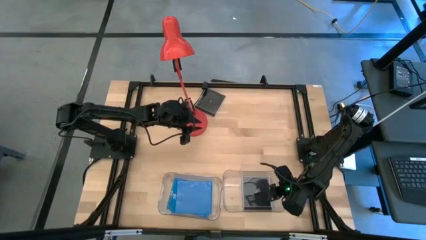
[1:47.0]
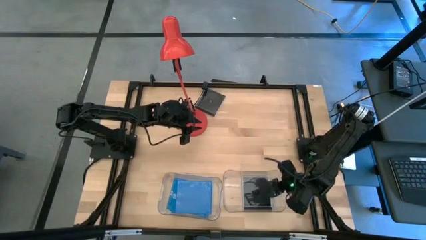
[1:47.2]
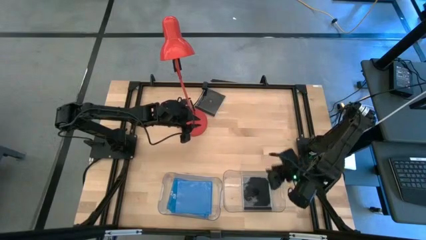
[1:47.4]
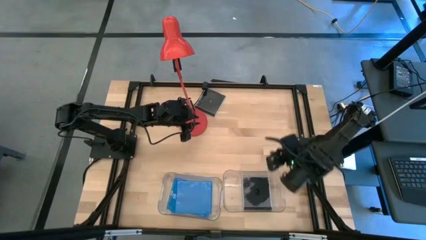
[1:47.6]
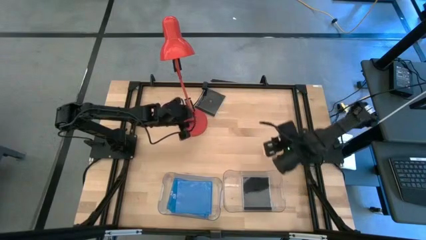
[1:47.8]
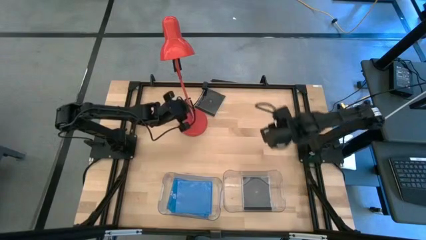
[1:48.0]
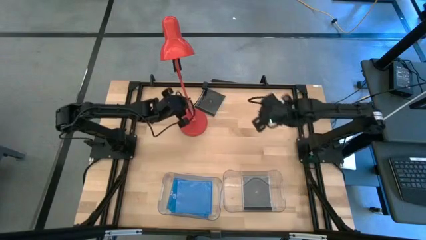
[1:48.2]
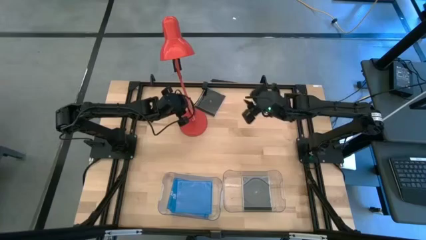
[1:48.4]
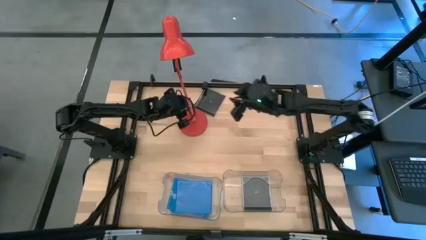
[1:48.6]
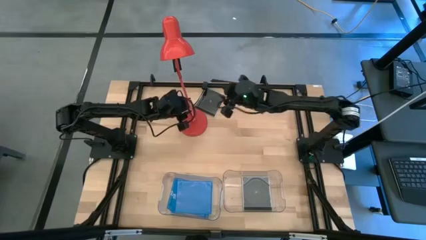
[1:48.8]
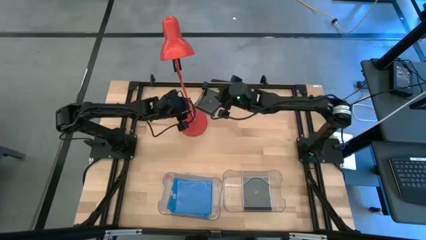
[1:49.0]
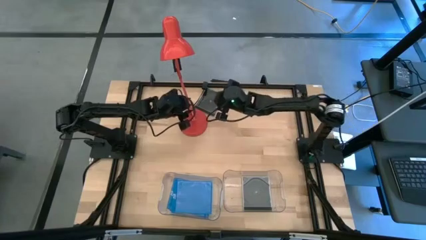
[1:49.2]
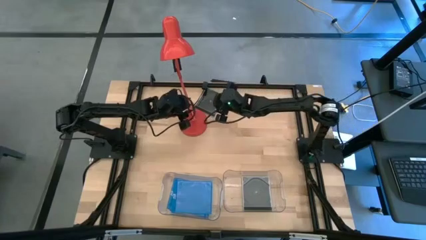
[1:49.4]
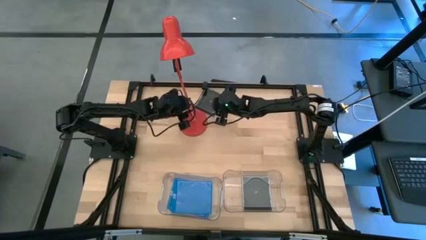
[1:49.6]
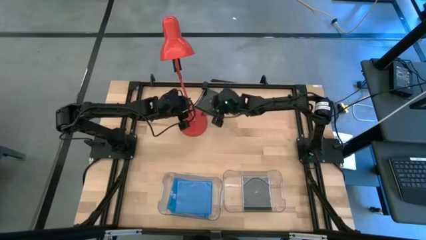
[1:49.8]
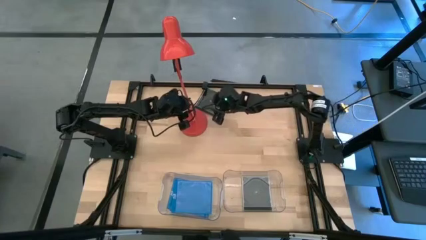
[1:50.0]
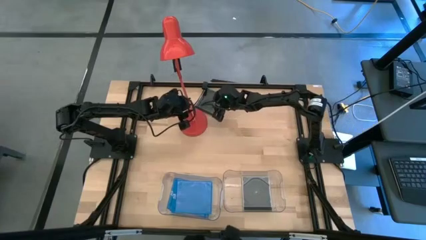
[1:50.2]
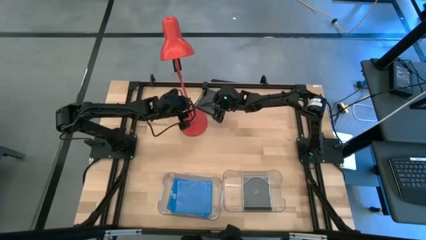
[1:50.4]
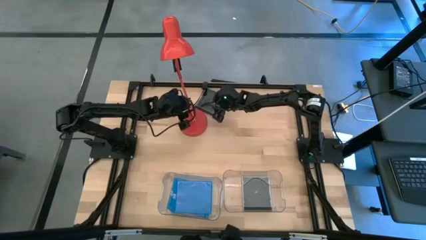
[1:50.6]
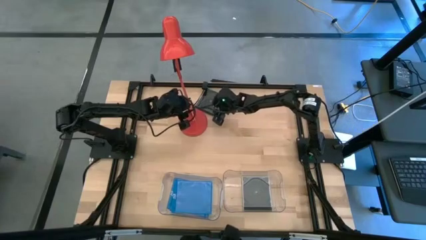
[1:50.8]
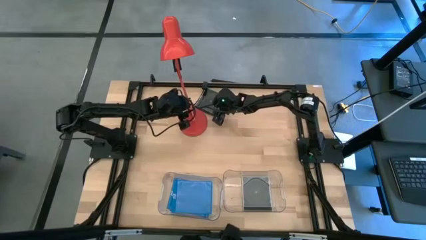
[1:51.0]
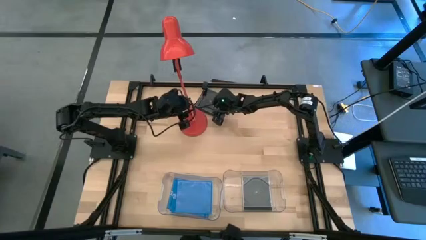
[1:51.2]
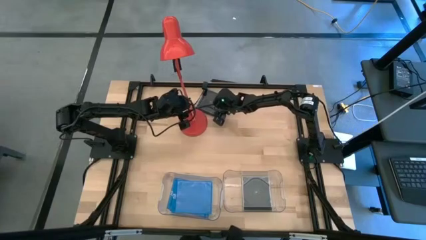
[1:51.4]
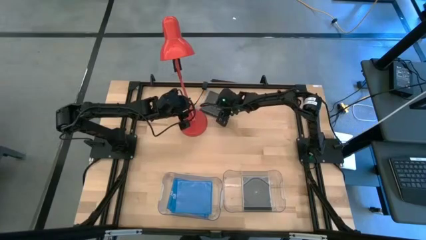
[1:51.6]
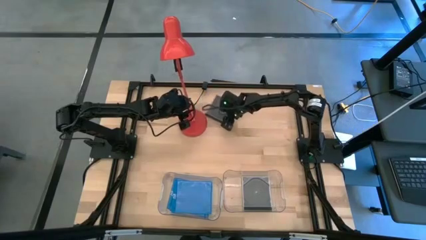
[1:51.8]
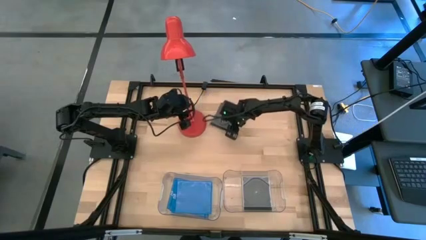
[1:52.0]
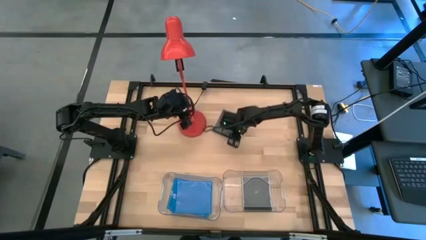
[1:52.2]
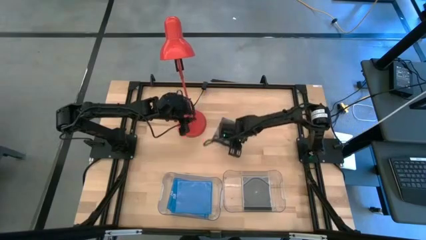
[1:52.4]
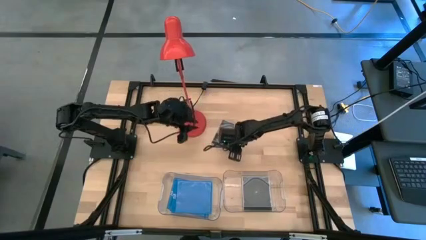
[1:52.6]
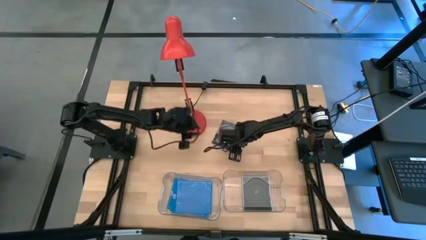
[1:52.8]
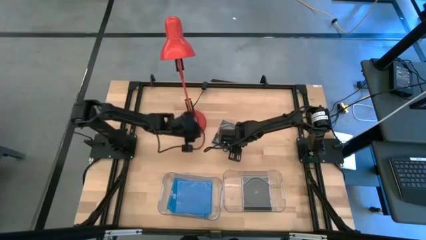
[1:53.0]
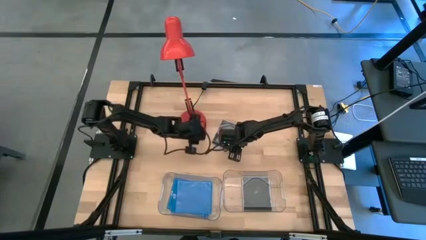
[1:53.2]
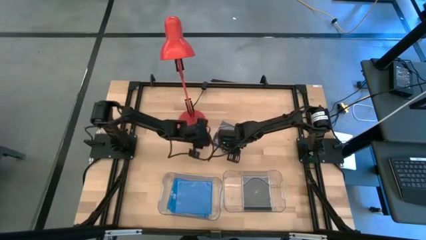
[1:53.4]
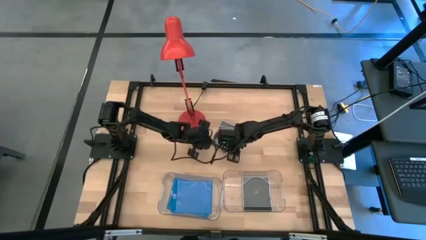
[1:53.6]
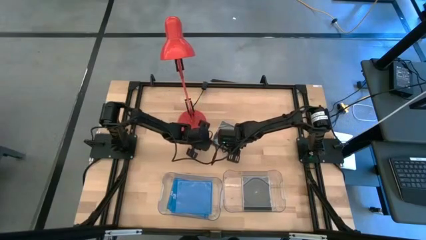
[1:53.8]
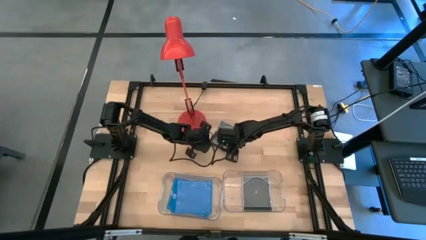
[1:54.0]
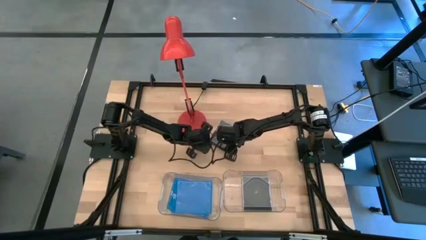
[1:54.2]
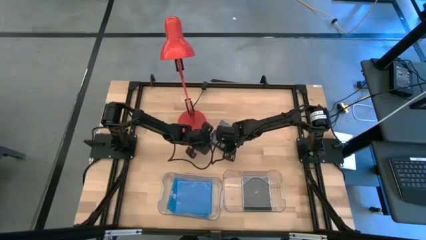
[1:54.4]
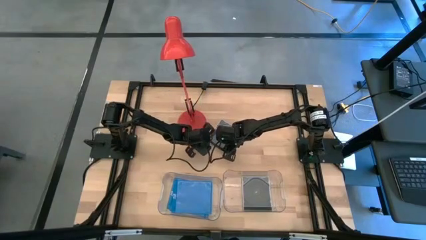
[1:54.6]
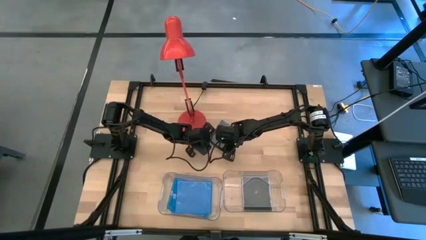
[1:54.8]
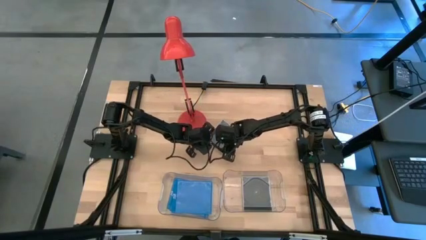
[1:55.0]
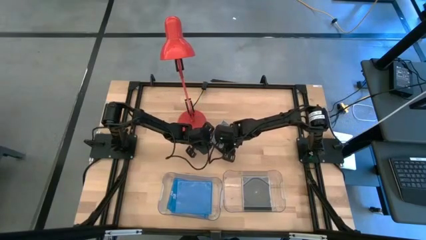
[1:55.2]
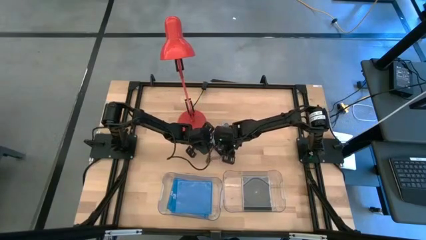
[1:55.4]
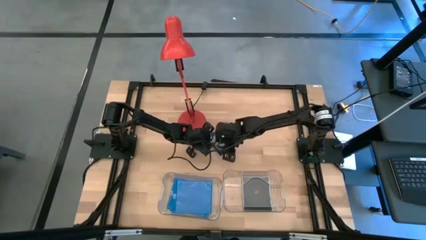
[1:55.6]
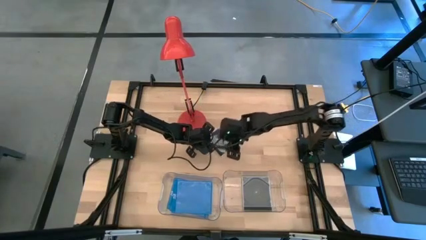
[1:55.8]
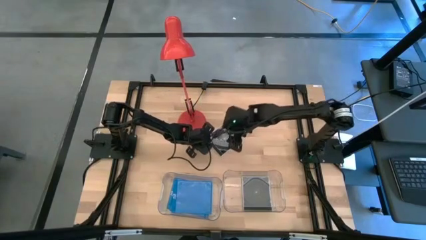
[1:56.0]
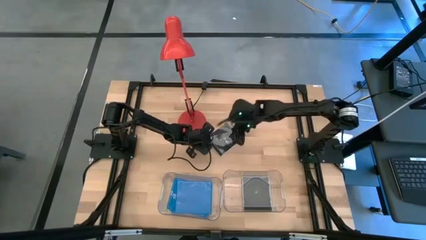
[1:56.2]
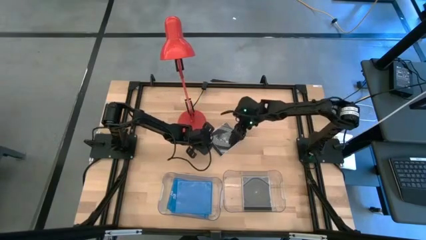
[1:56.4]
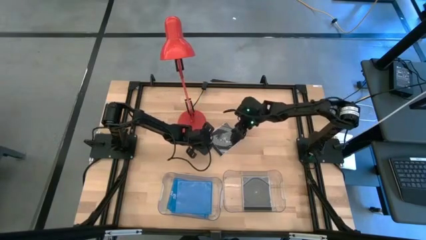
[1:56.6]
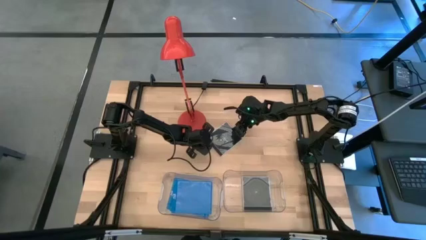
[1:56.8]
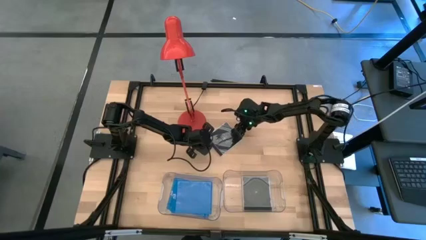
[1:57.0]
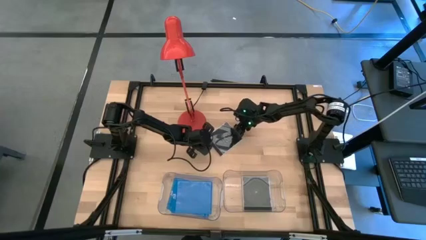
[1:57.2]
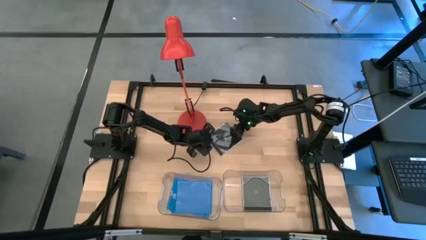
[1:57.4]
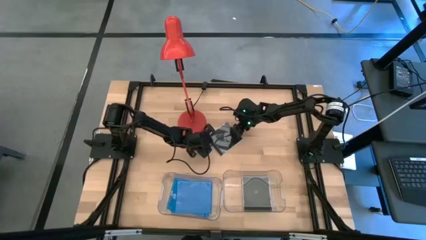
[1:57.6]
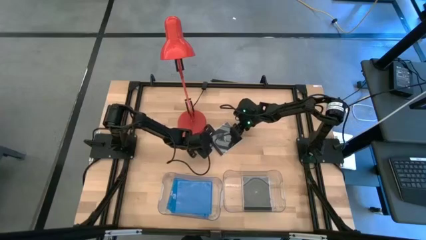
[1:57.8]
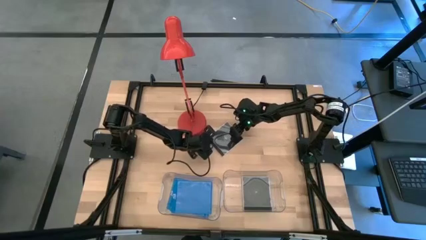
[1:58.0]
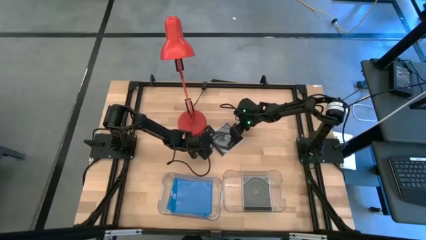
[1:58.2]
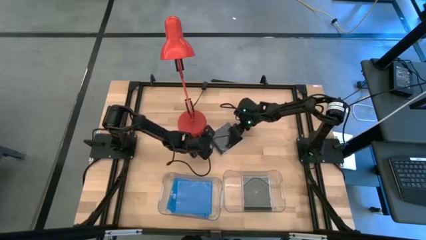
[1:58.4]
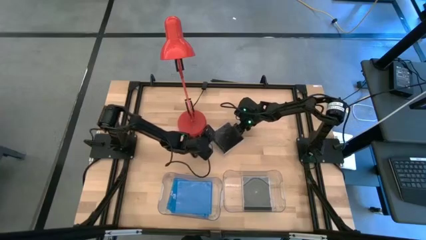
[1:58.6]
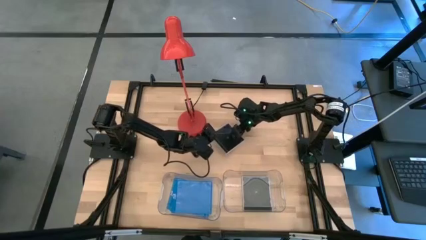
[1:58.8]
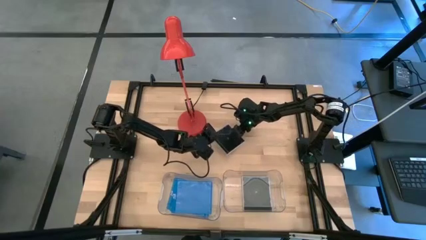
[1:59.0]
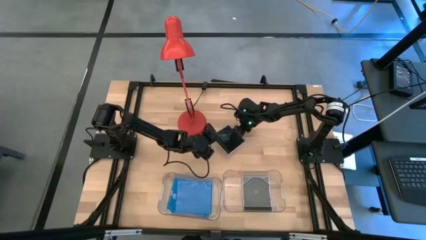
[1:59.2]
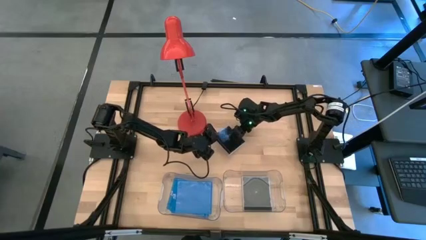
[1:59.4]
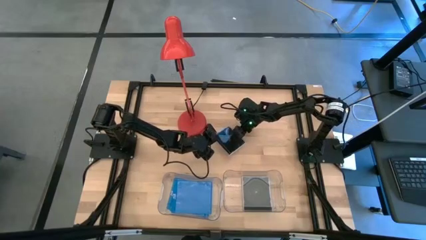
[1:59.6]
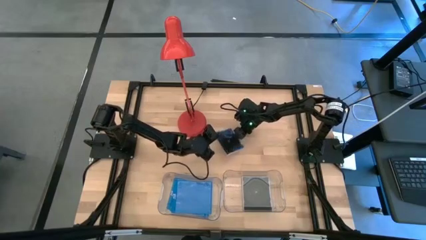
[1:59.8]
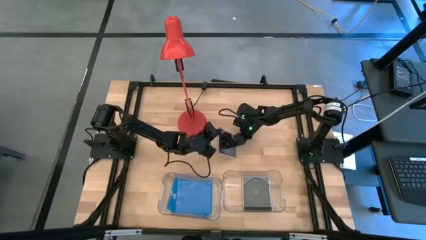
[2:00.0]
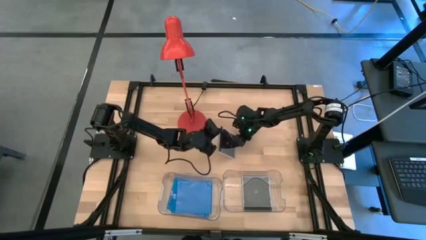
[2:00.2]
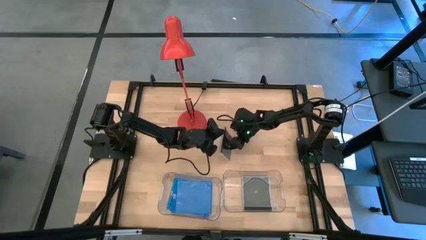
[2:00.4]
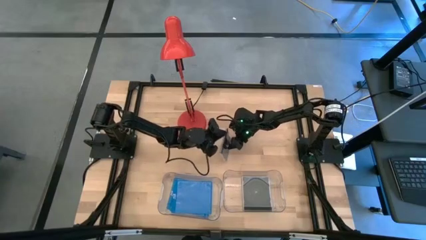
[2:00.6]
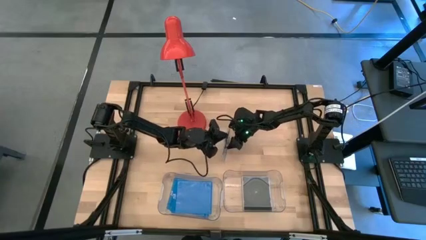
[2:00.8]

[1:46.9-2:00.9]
Task: Pick & place jewel cases by type
Put the black cd case into the right transparent bin
